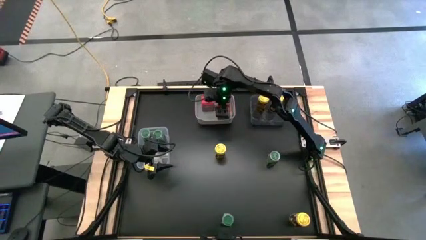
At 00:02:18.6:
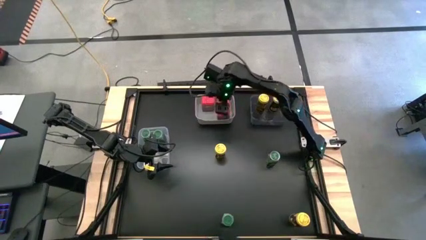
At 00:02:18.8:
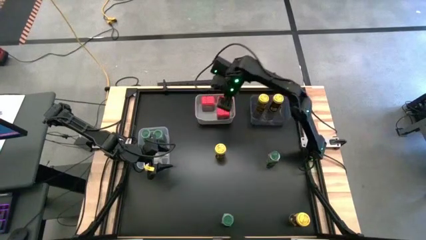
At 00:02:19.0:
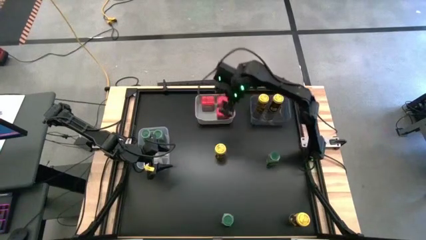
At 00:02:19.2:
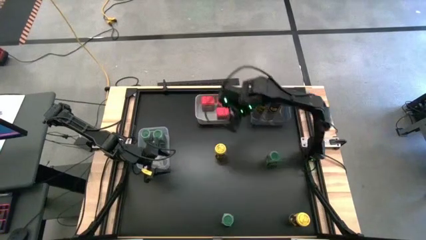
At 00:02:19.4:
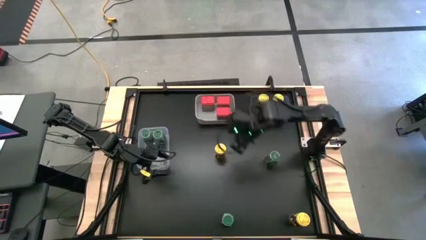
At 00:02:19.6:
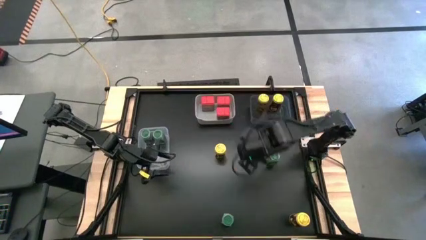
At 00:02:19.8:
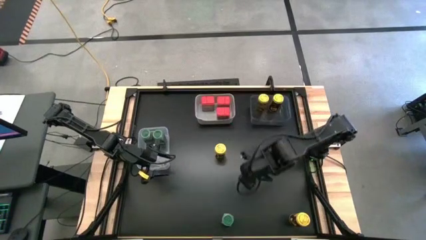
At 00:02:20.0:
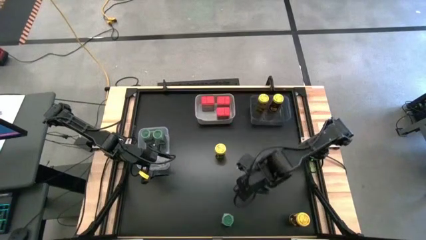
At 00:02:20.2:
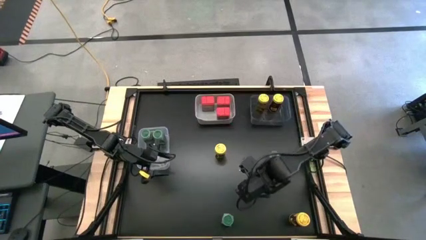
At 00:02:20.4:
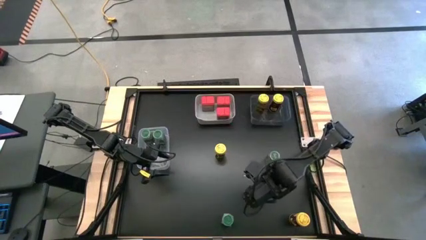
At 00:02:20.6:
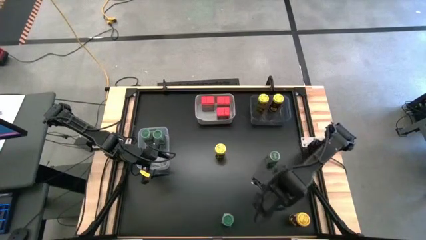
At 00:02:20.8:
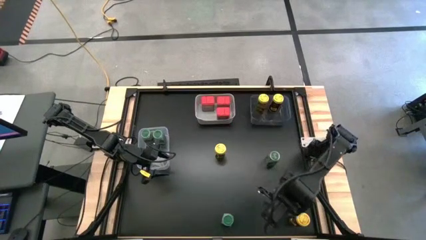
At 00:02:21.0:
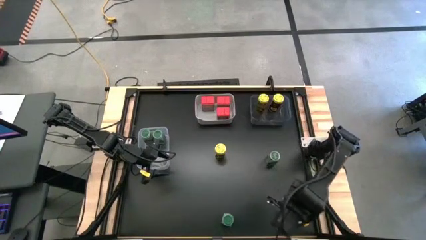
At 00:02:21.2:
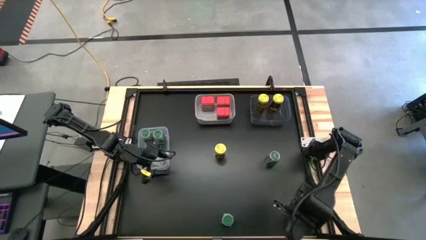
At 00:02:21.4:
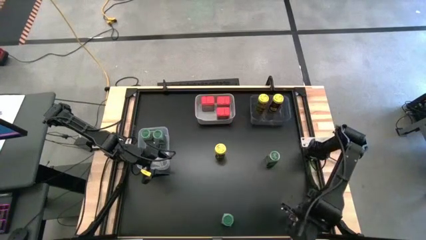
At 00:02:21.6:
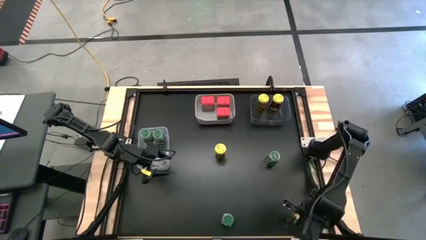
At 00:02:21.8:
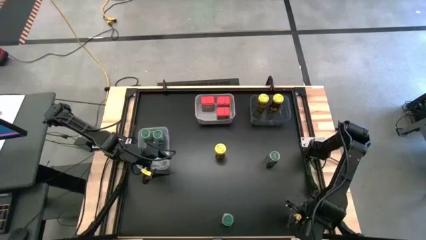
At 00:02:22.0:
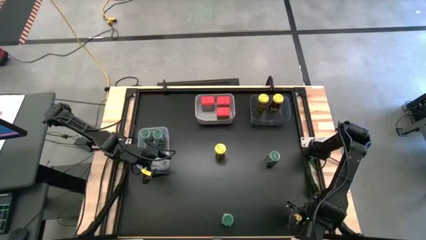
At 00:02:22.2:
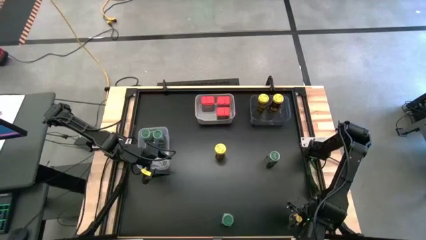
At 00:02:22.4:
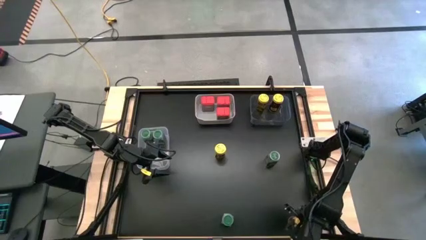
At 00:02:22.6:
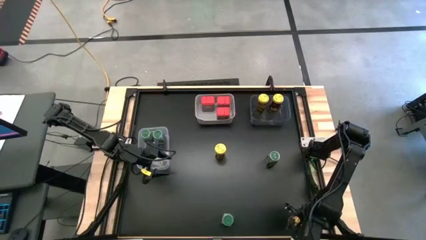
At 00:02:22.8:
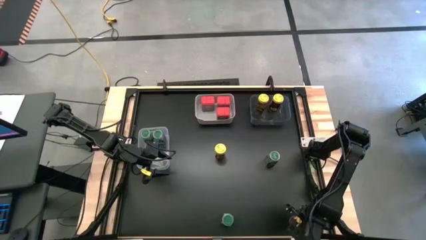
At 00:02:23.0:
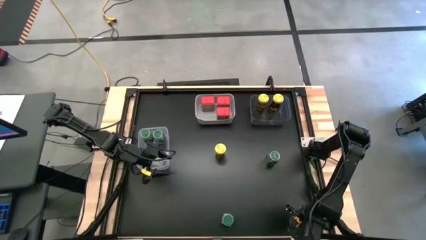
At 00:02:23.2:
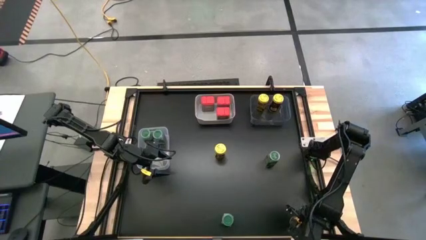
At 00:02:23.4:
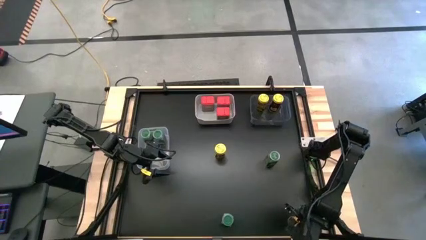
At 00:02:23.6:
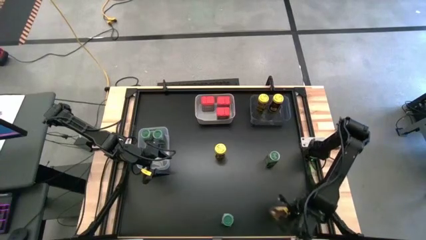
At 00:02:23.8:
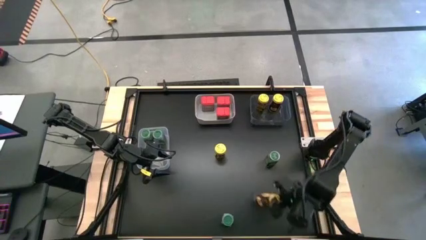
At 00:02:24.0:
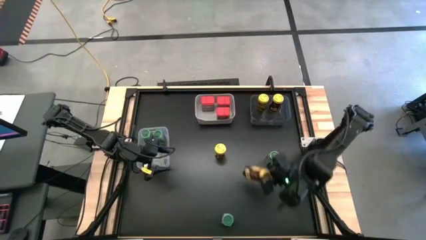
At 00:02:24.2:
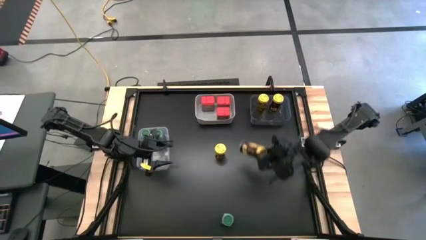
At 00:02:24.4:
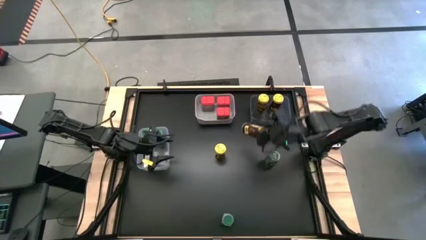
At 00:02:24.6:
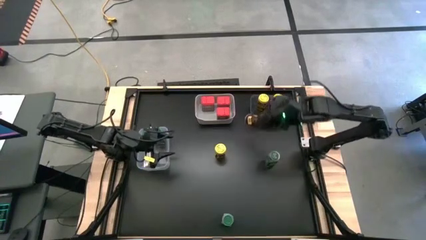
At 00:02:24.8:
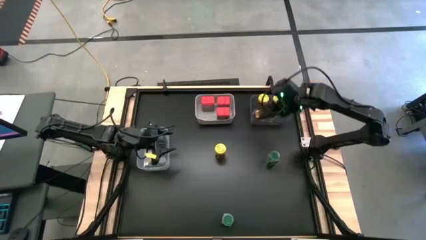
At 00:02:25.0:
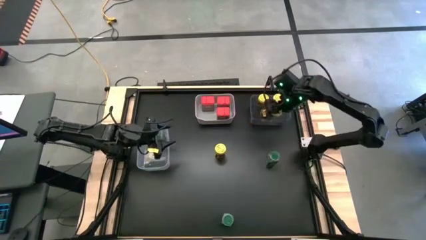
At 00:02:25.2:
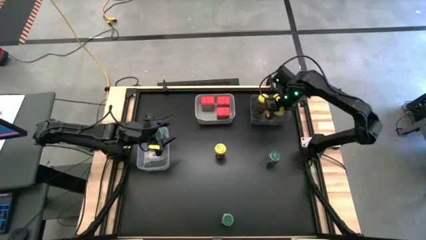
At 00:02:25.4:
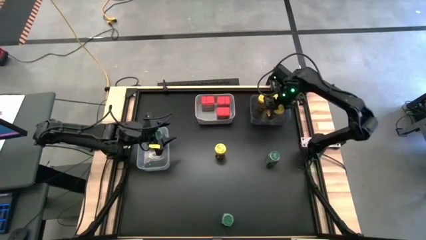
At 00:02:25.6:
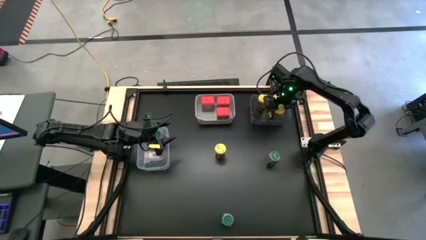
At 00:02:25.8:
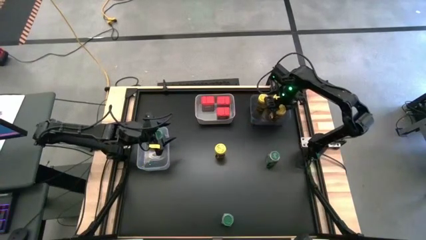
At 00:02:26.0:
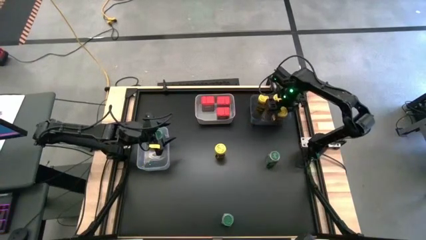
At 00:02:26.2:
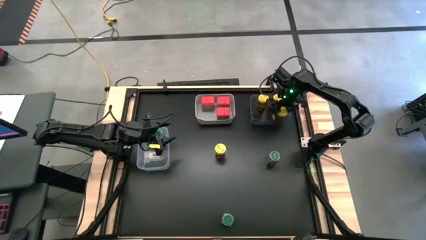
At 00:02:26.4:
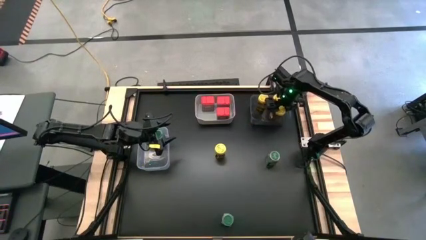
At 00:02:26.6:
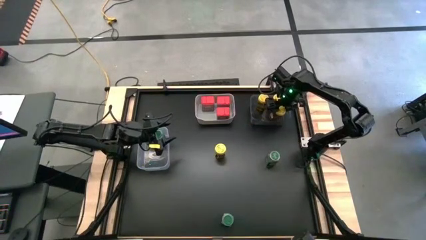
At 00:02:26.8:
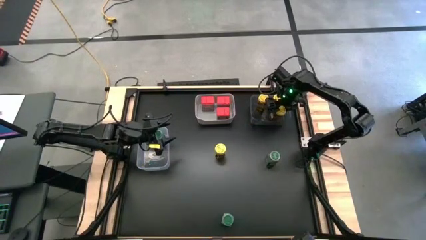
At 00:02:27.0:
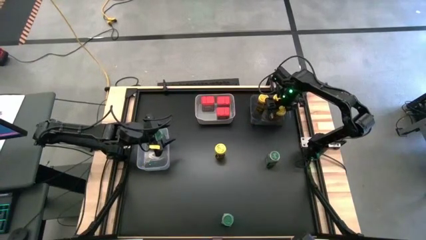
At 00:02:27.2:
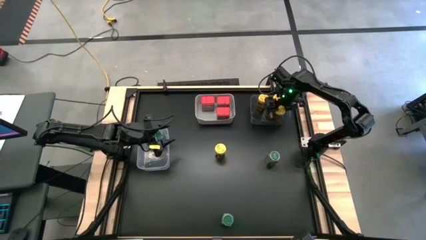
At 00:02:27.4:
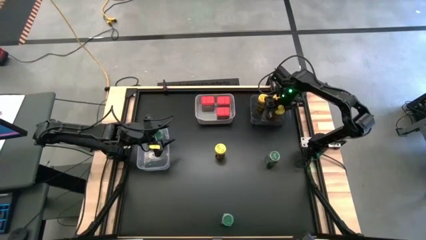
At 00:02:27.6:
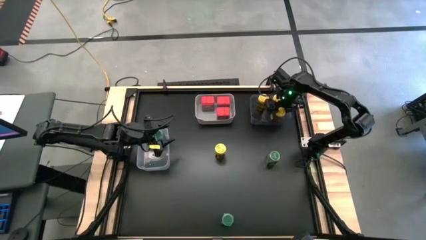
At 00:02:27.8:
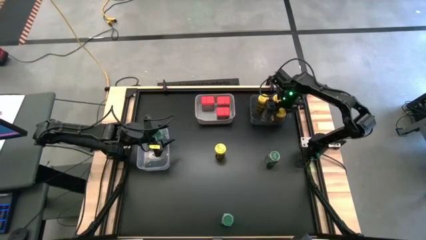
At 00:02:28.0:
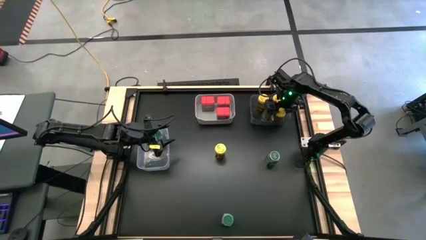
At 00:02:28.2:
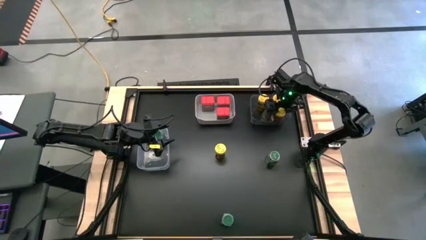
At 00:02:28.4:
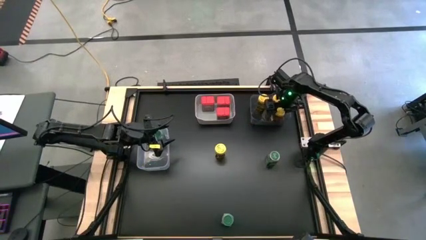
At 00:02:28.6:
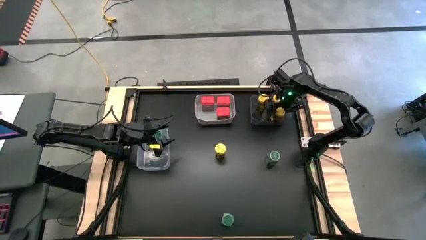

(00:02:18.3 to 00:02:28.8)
Task: Sort spices by type
Put the bottom yellow seasoning bottle into the black bin

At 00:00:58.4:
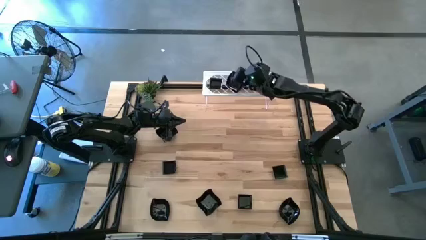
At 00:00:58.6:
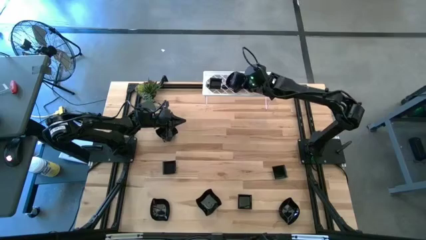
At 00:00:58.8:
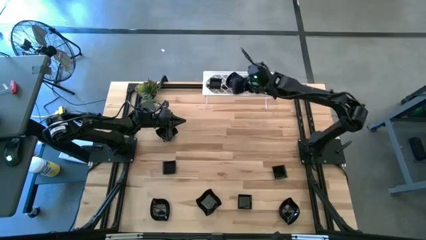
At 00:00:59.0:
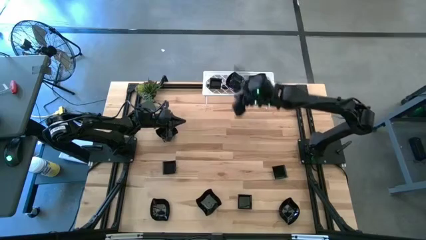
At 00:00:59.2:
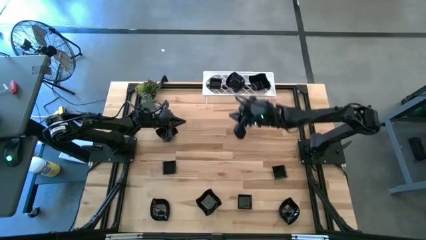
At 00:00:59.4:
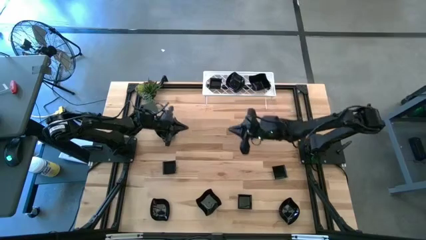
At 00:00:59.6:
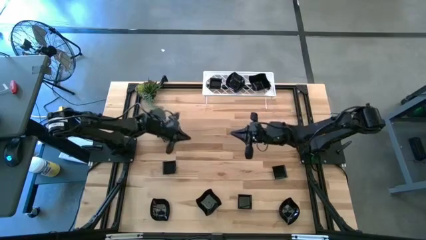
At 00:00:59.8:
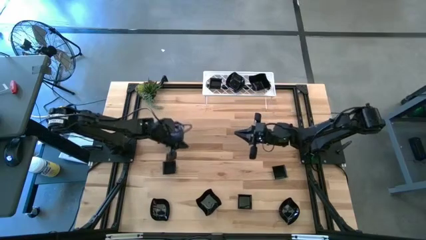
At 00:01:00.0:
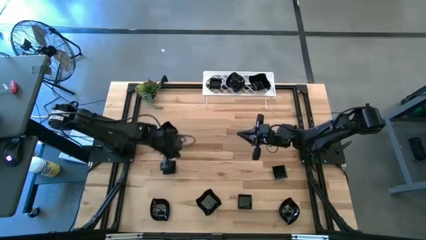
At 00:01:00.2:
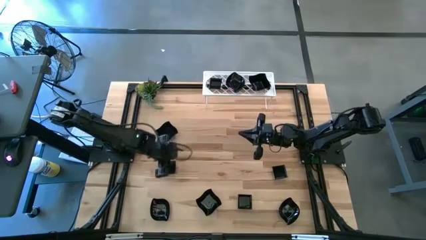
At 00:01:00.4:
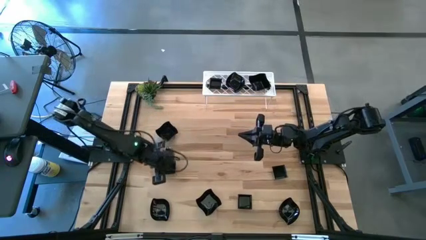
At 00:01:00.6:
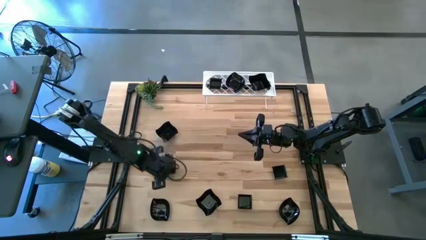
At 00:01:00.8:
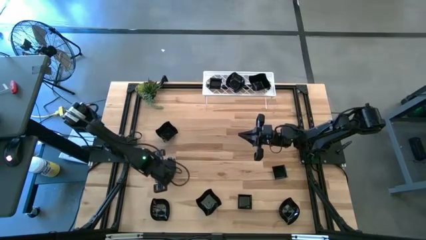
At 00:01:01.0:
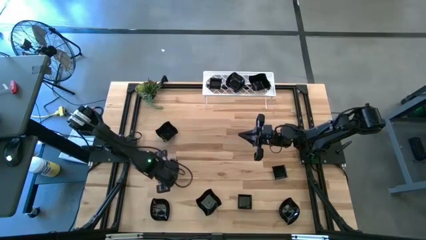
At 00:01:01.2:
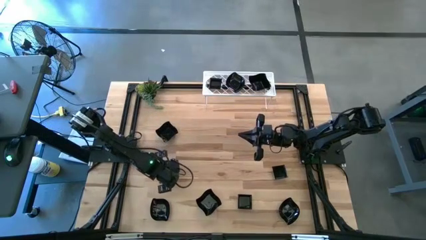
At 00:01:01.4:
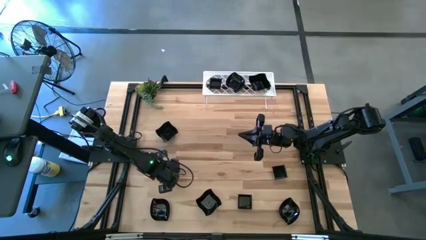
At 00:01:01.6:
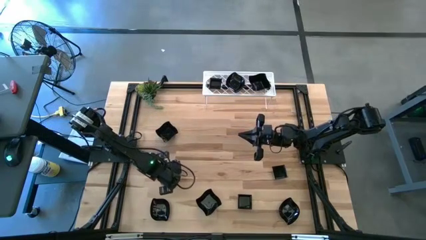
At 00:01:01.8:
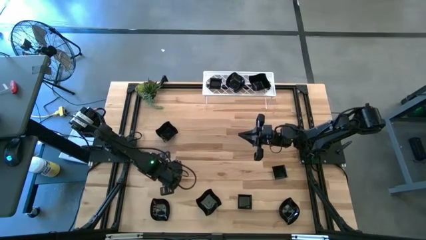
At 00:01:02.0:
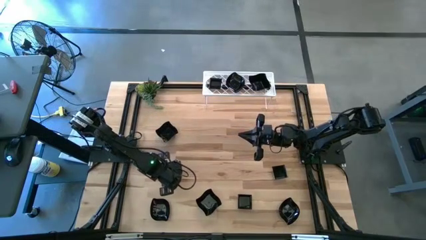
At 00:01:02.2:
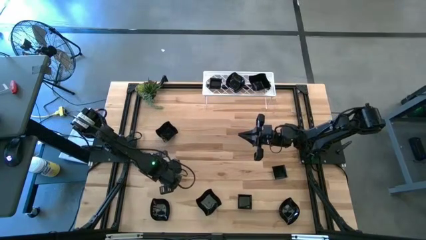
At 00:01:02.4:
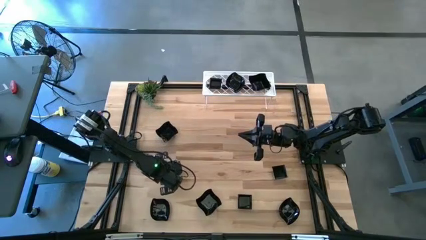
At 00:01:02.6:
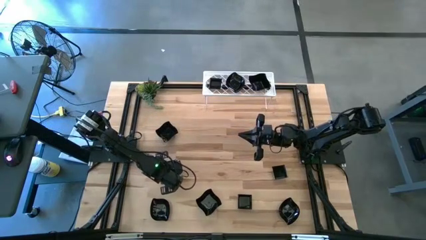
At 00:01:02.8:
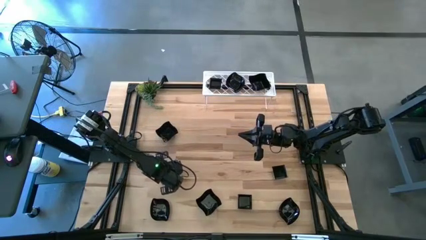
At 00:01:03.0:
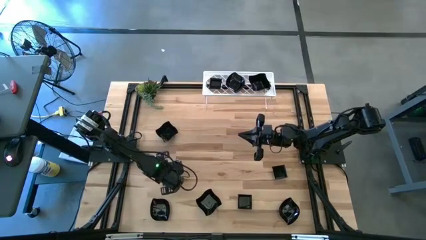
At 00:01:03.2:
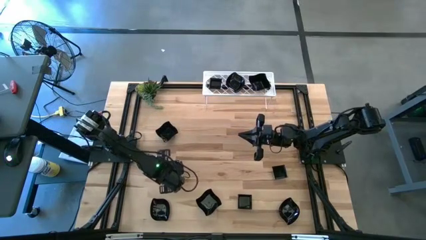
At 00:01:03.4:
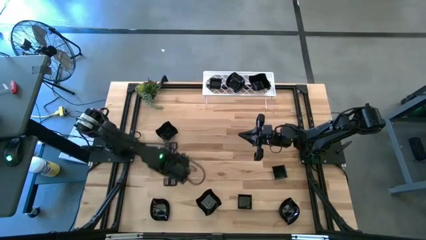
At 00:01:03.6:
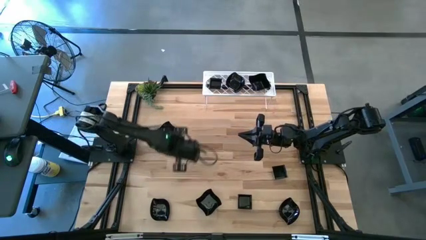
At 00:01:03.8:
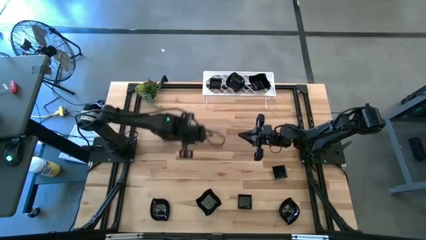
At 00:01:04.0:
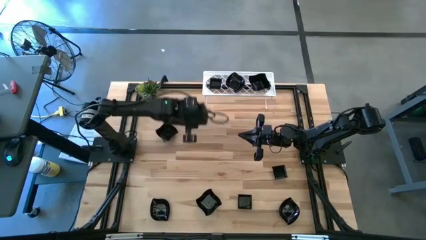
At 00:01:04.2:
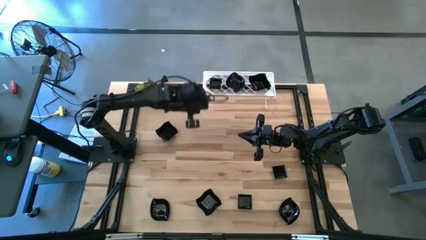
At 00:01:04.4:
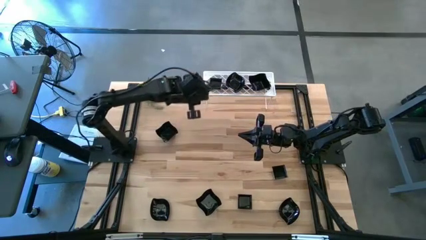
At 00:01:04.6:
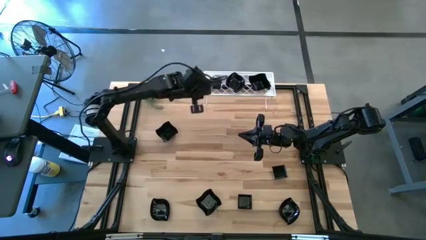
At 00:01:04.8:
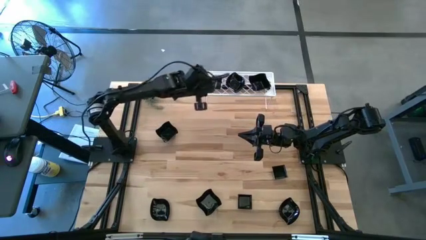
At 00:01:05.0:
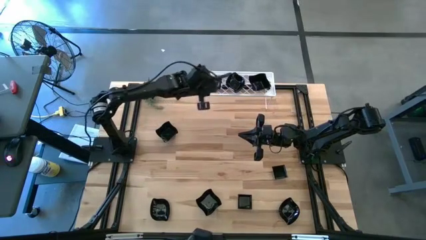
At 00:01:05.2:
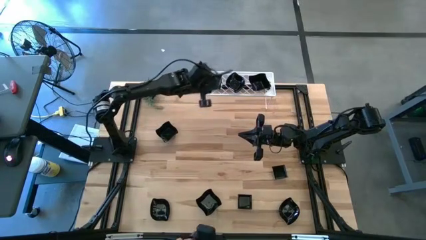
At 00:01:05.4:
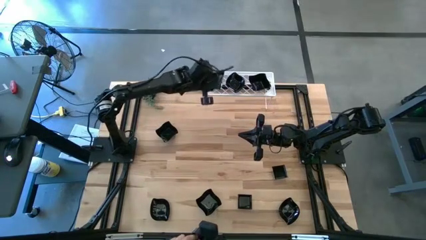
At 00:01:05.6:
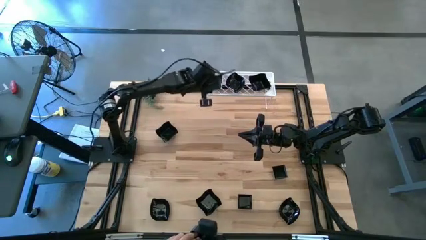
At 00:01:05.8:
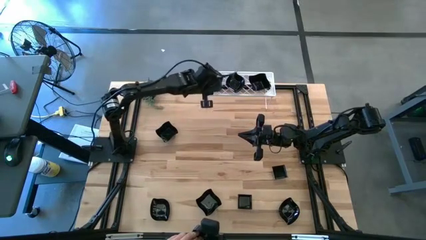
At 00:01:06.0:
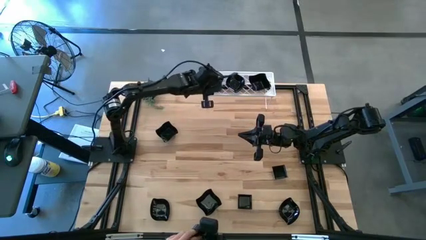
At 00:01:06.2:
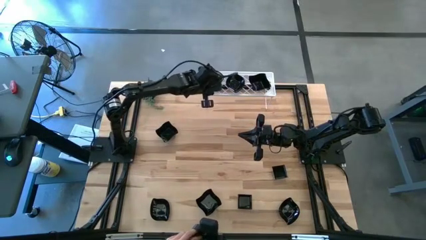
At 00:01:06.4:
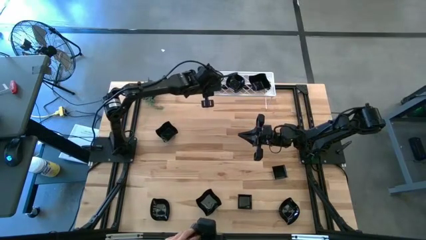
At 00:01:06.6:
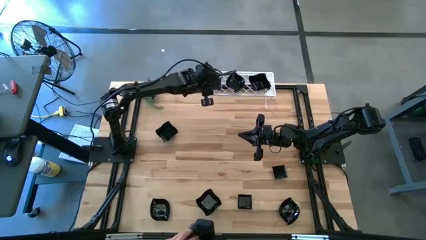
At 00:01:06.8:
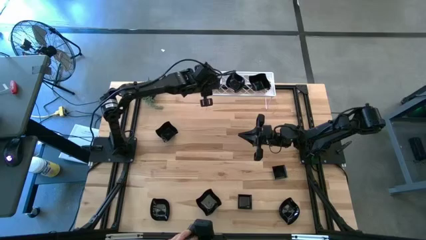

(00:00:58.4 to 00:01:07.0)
Task: Pick & Place Mini shaped plates
Stack the square plate on top of the square plate on the shelf
